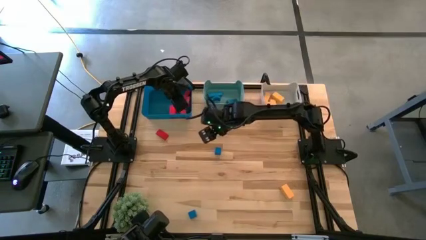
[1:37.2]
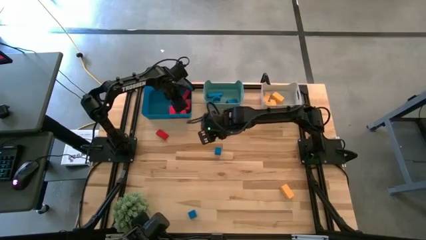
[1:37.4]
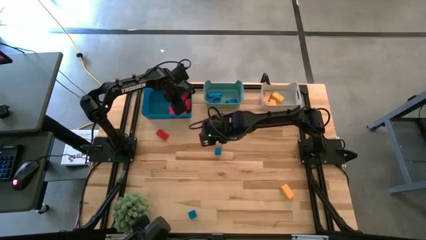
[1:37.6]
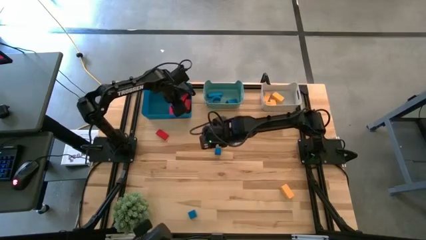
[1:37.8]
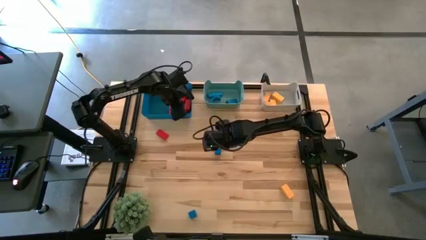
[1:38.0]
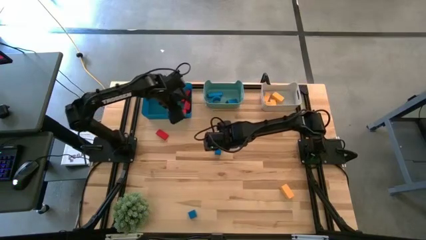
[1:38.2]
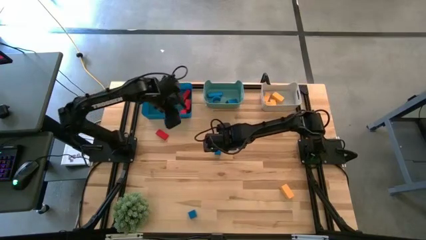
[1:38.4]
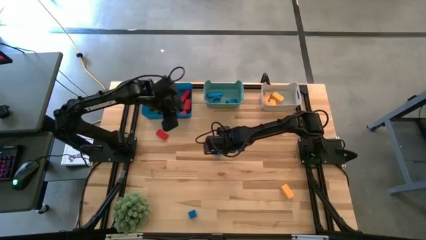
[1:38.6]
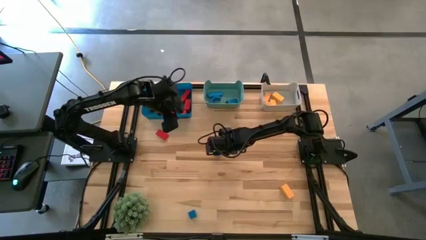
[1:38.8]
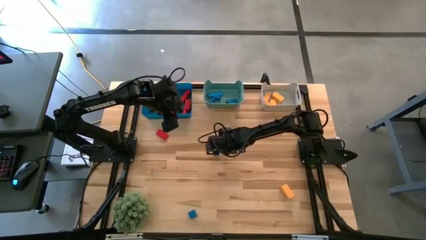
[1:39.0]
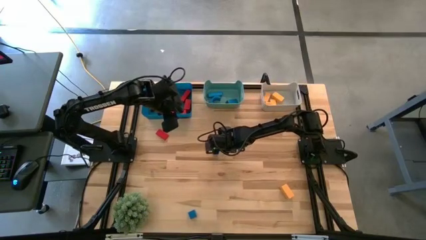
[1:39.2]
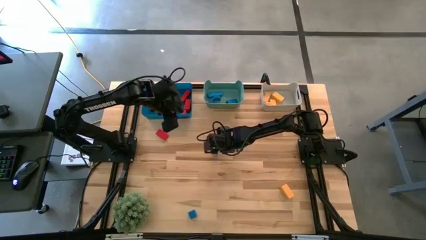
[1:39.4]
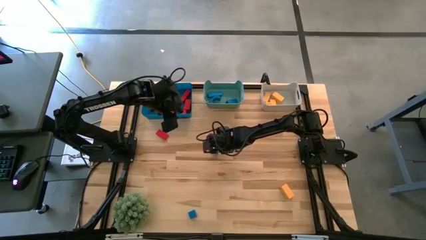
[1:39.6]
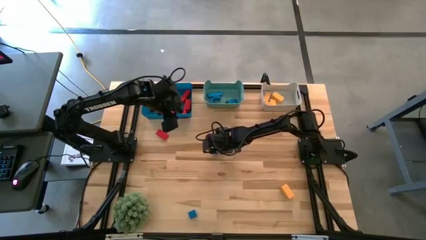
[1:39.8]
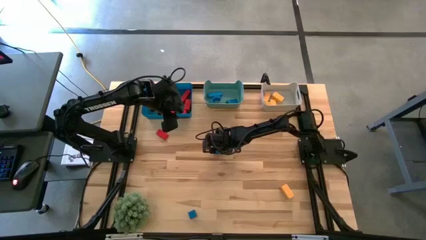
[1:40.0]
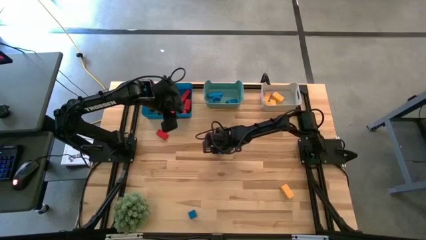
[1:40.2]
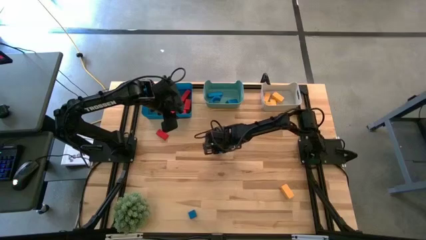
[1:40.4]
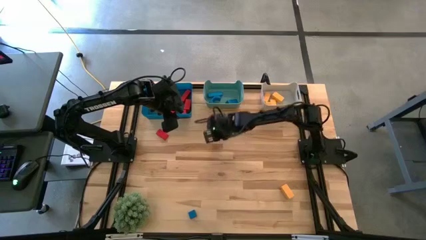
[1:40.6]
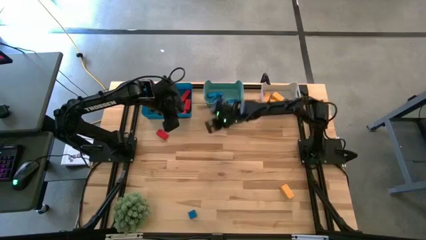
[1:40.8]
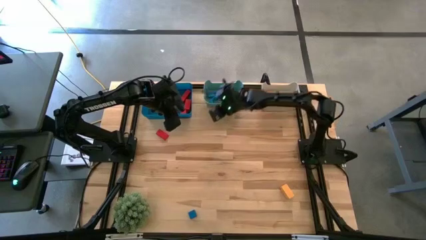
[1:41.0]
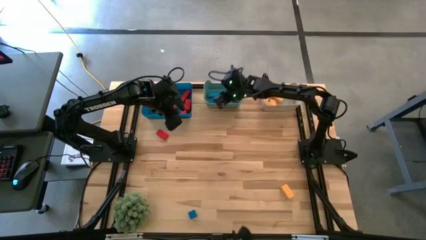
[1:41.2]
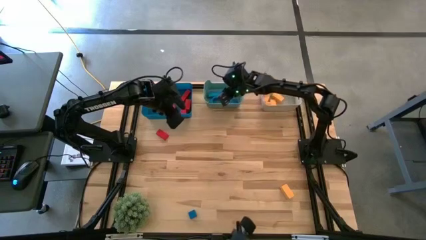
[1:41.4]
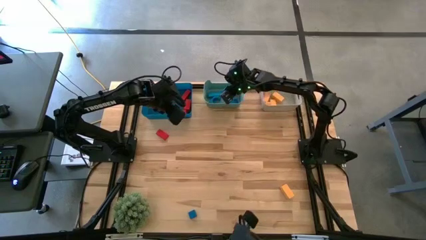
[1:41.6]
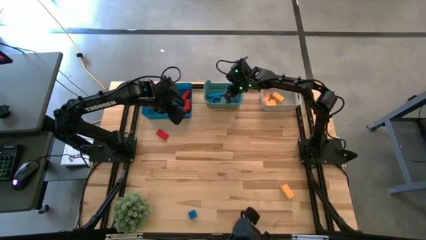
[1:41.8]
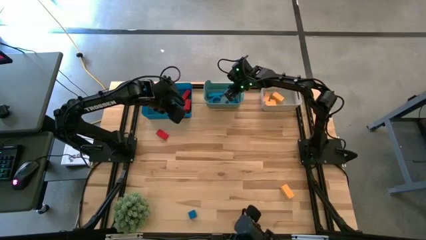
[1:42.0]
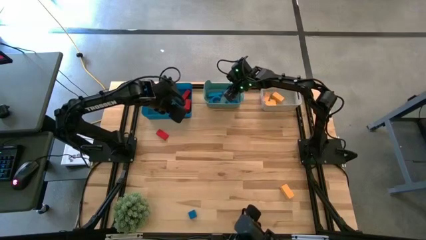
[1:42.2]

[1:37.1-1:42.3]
Task: Sort & place blocks by color
Put the blue block into the green bin

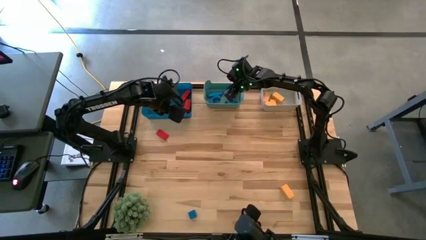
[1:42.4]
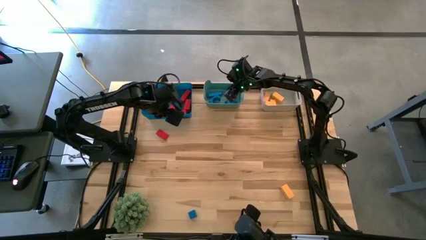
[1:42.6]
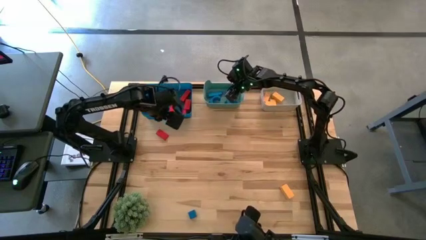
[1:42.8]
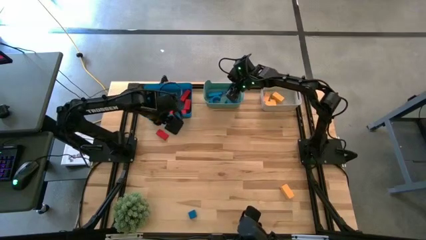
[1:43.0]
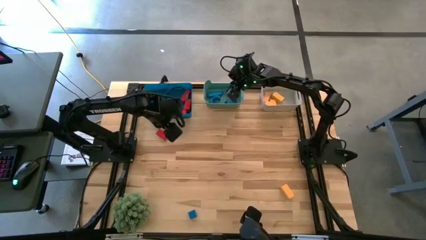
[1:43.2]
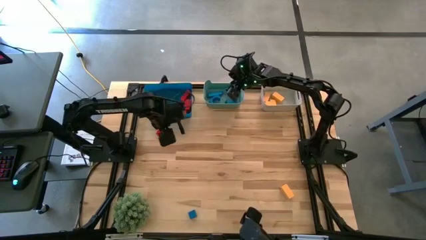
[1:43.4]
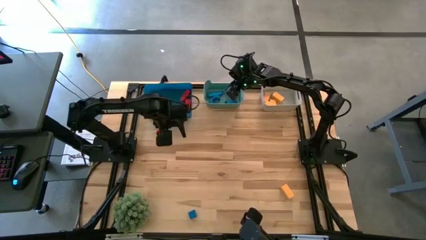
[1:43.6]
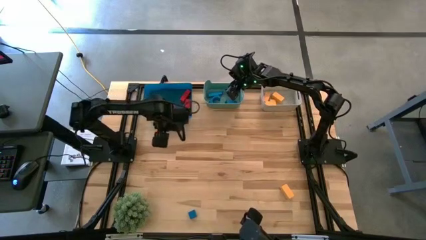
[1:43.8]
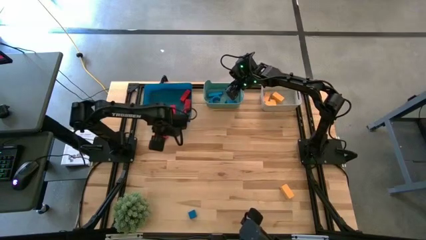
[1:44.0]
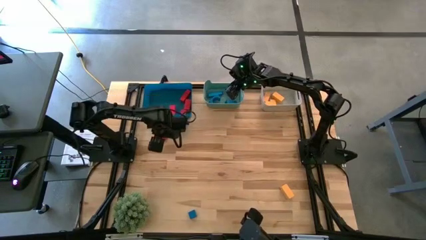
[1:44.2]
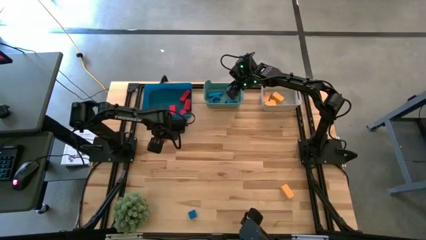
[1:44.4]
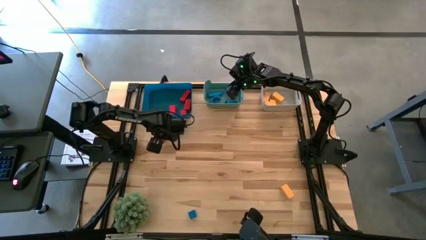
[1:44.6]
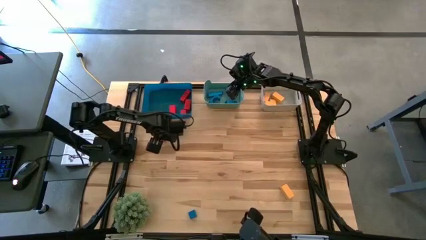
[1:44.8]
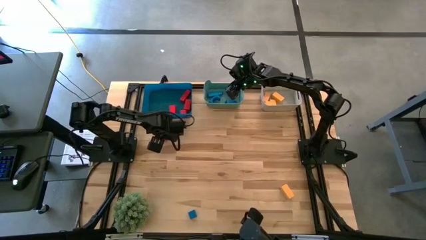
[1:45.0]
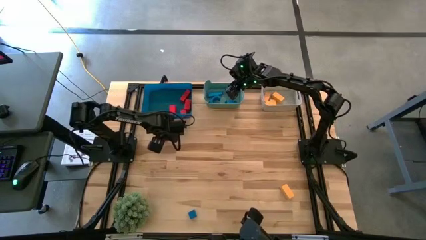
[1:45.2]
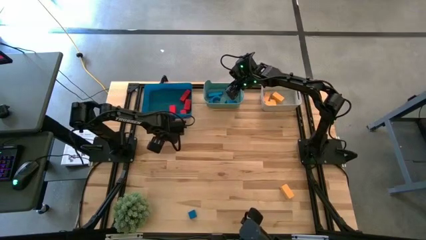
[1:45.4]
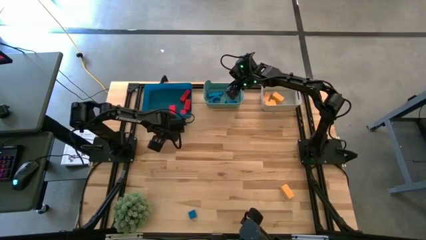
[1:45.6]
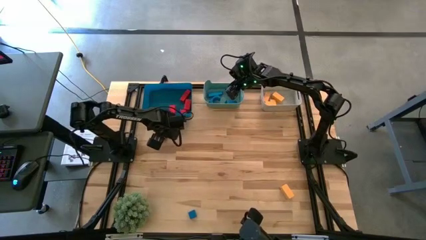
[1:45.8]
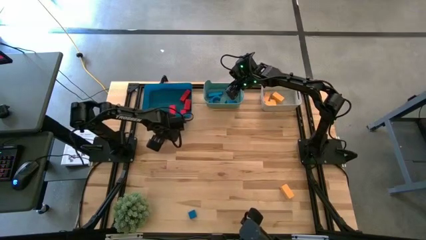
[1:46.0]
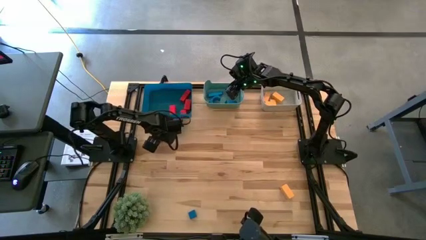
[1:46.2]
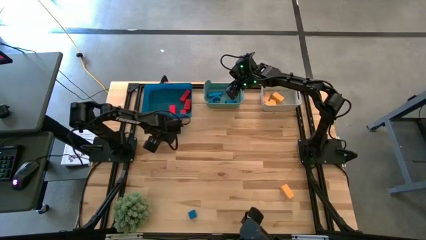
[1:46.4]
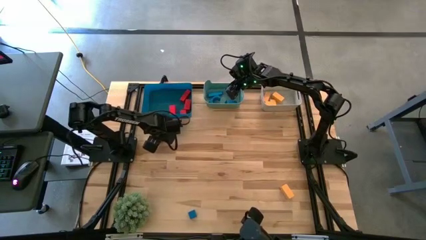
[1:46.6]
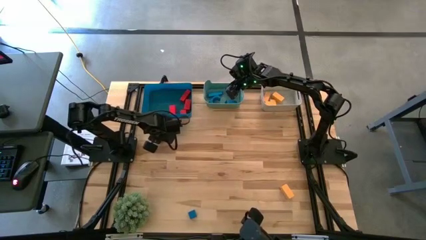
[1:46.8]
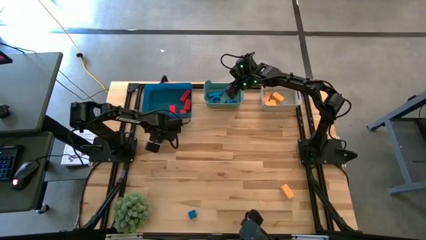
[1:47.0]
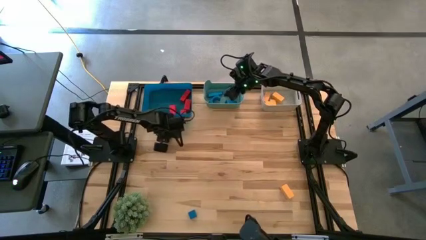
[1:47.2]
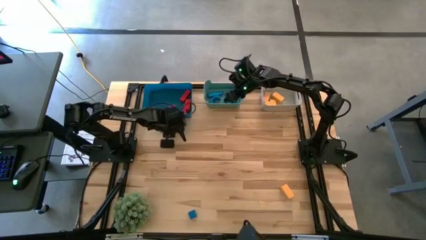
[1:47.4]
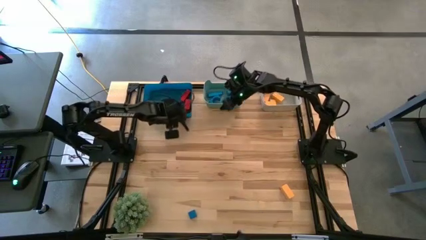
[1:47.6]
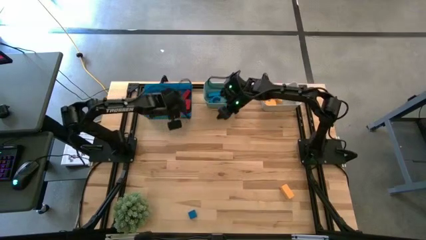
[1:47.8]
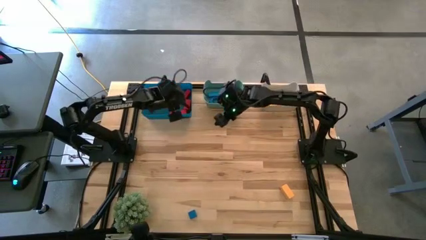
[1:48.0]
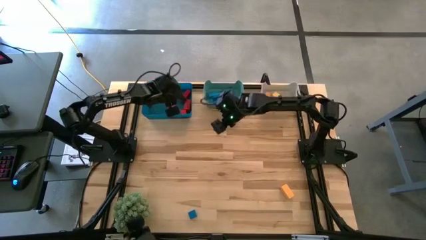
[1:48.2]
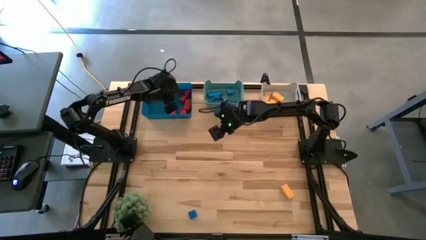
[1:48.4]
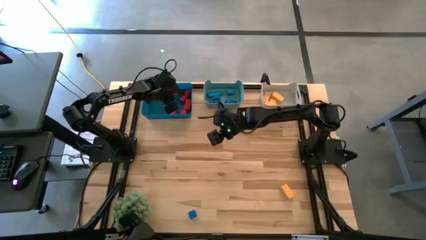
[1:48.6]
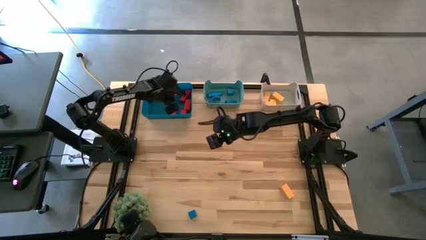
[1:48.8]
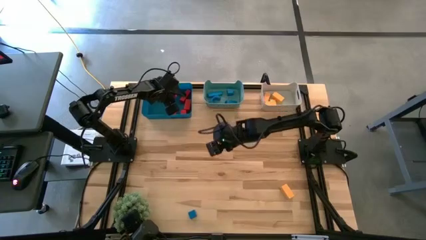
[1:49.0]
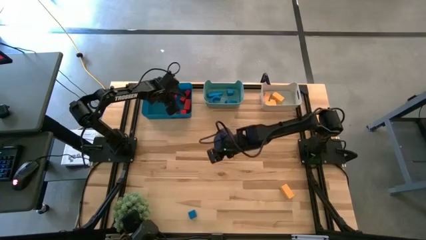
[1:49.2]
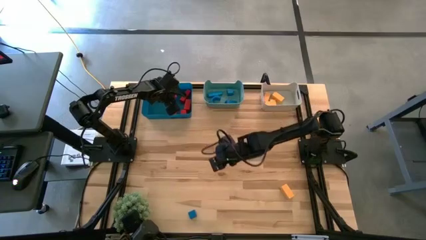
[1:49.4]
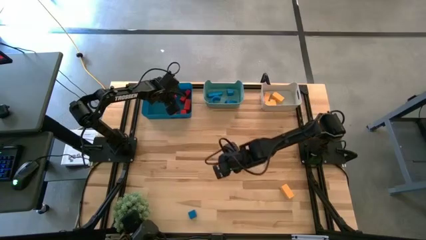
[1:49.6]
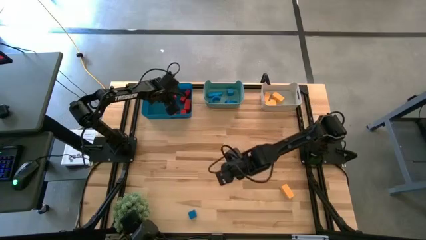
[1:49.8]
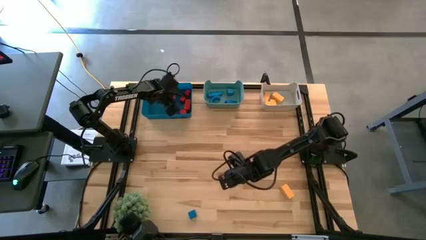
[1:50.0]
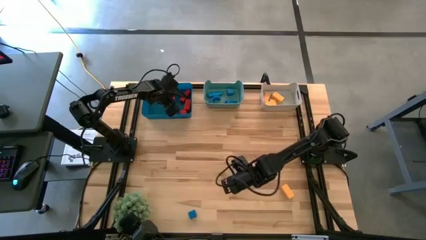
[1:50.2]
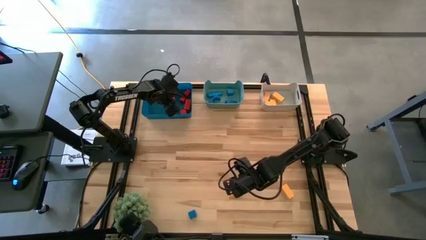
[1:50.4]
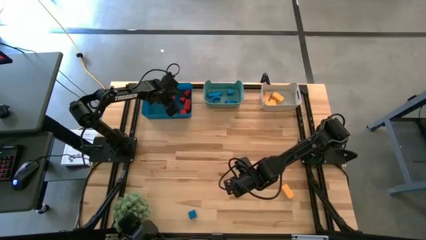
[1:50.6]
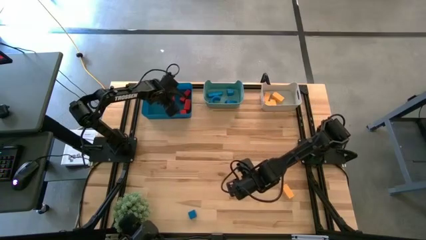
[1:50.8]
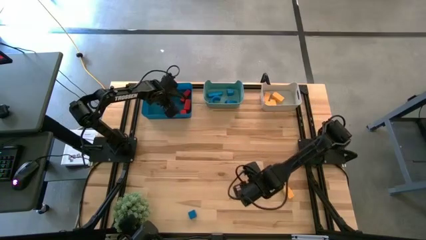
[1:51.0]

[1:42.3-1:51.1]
Put the red block into the blue bin

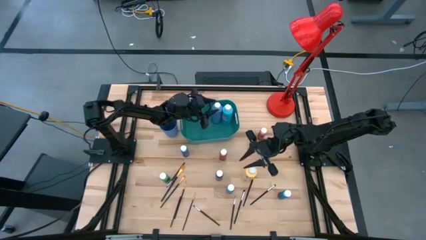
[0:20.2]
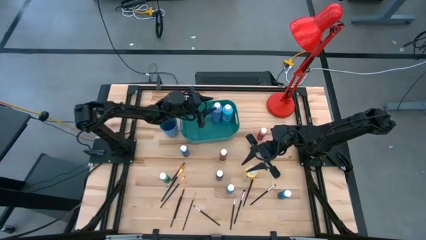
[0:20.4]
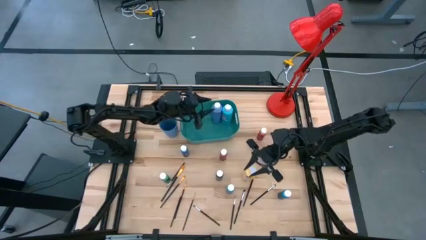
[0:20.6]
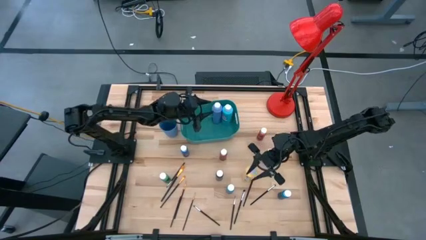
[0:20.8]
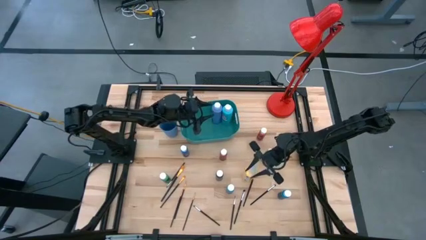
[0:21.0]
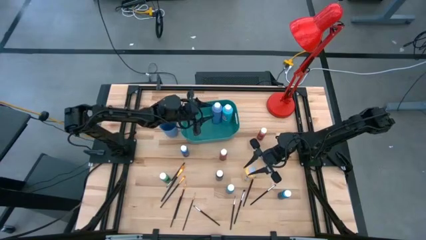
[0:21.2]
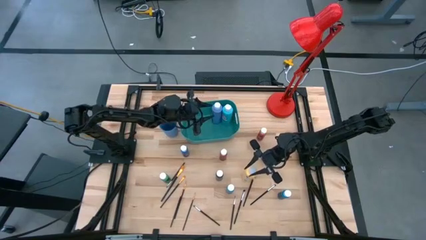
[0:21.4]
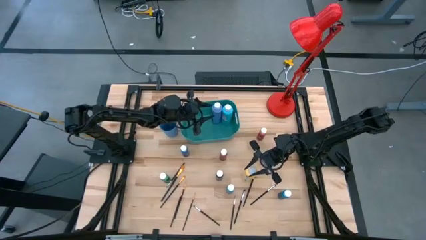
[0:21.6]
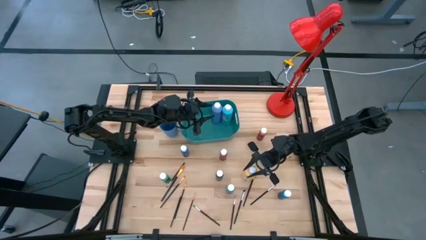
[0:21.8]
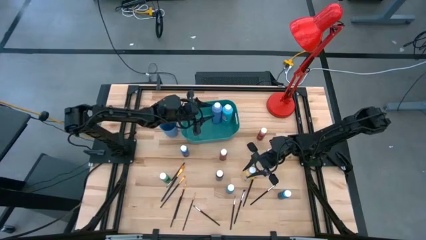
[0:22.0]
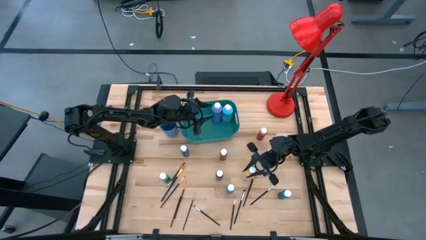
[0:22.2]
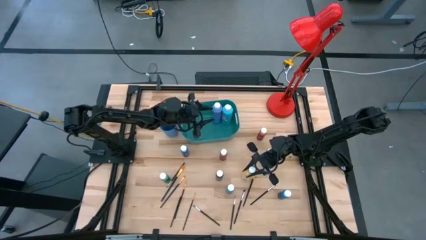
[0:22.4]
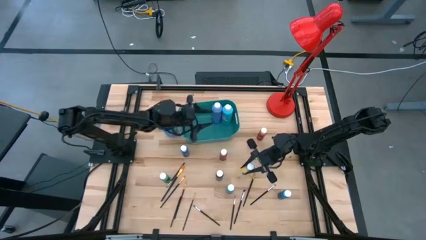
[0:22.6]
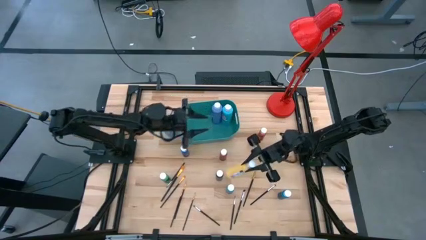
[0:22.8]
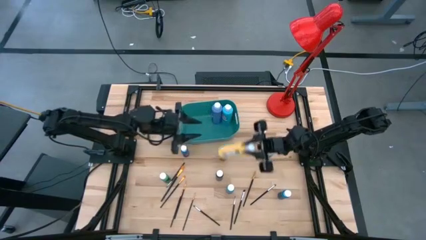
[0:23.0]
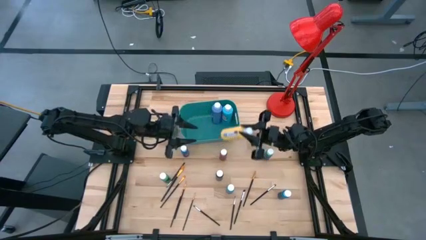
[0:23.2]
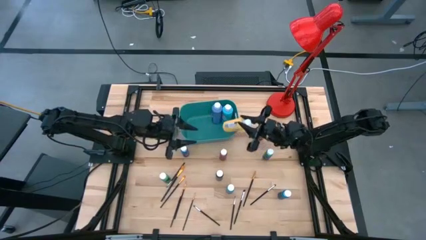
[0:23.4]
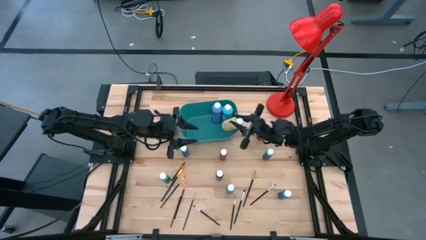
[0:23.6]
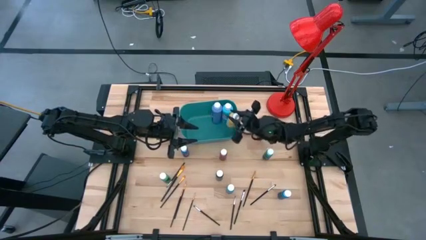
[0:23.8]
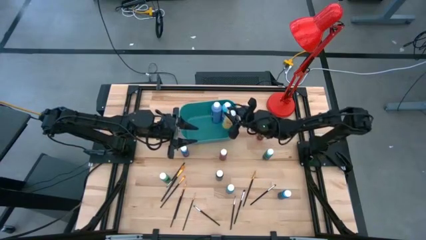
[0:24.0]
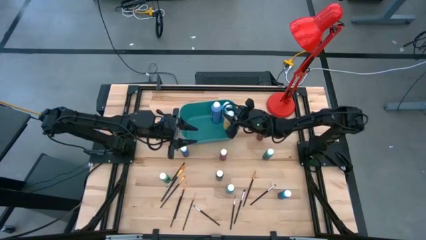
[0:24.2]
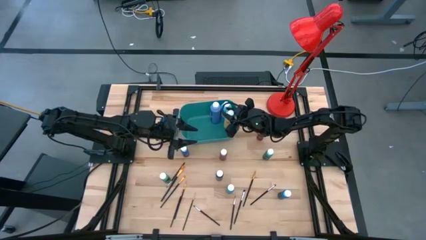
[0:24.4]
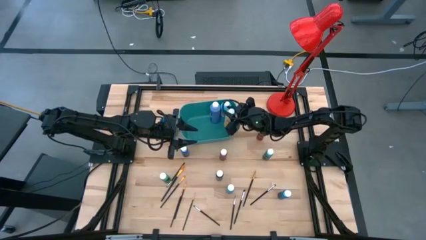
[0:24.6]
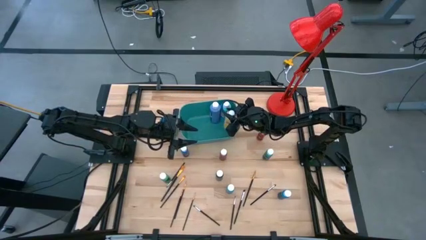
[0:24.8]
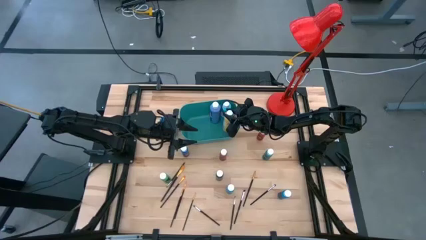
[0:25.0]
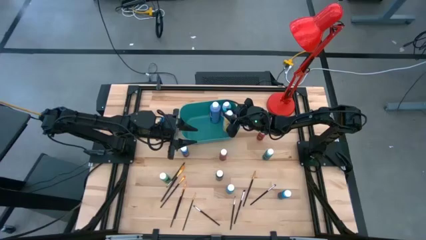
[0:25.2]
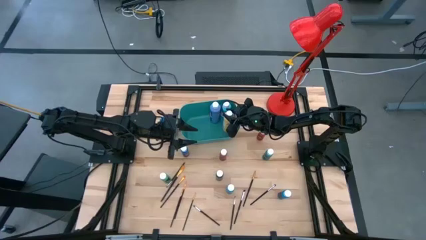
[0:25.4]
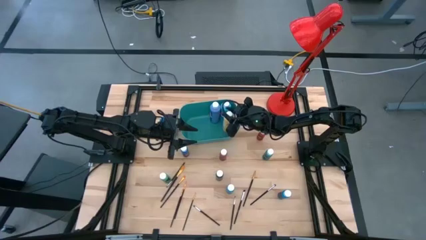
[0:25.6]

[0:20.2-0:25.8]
Task: Pick & Place Paint Supplies
Put the large yellow paint bottle into the green bin
